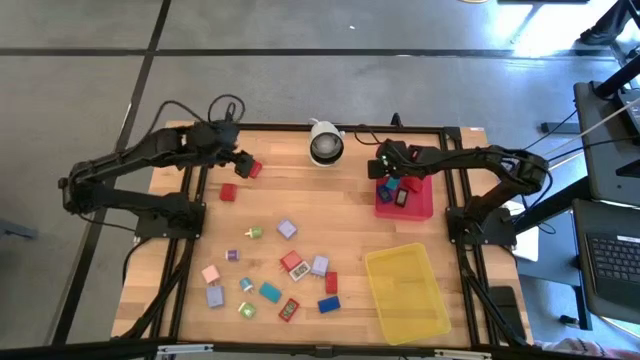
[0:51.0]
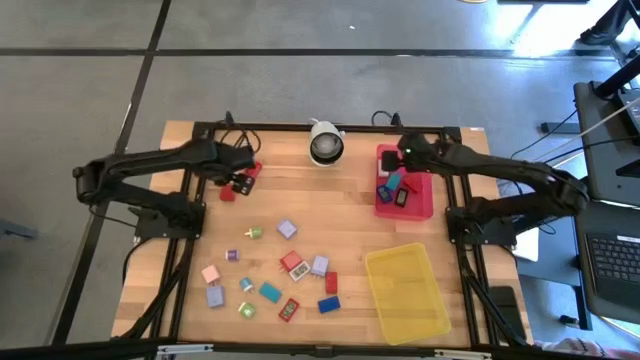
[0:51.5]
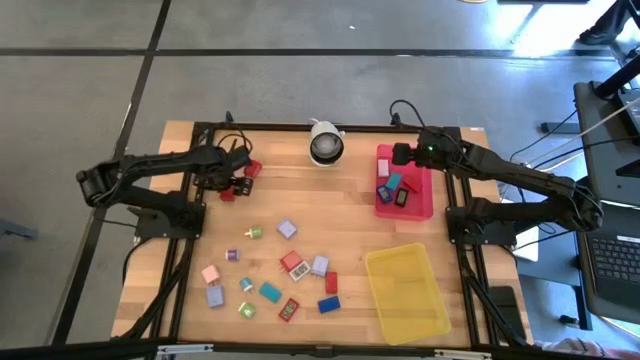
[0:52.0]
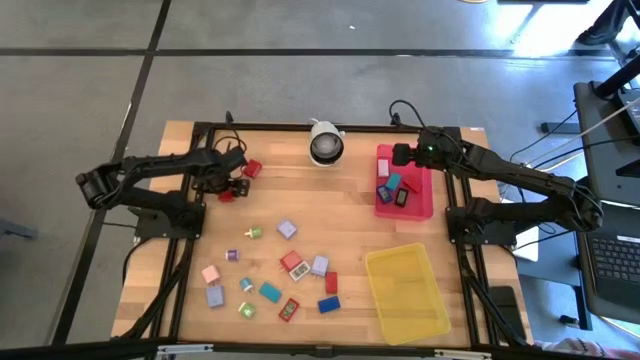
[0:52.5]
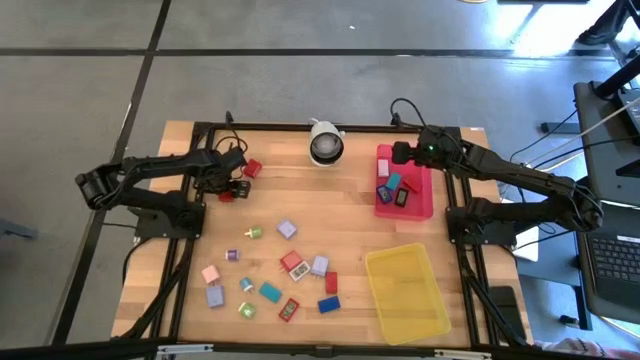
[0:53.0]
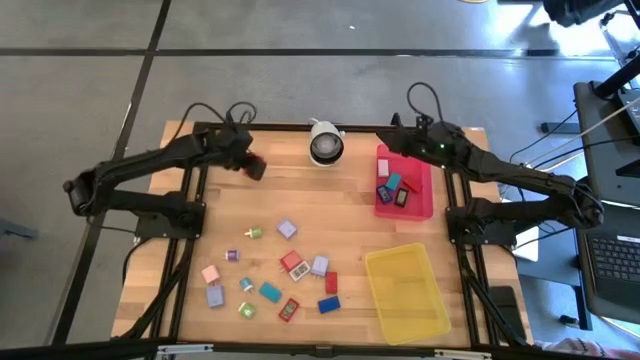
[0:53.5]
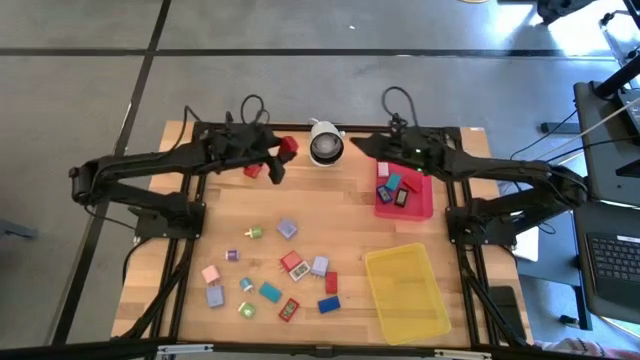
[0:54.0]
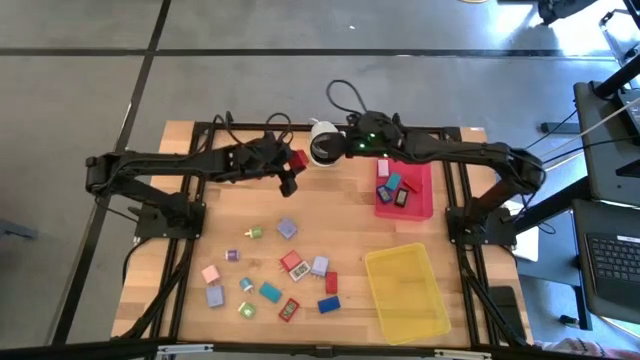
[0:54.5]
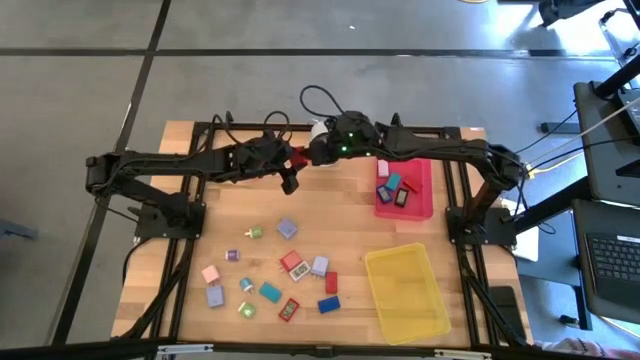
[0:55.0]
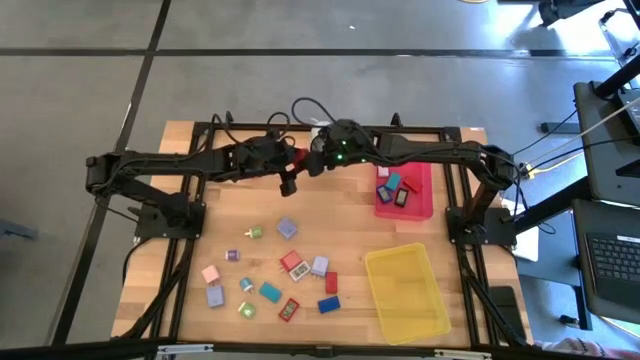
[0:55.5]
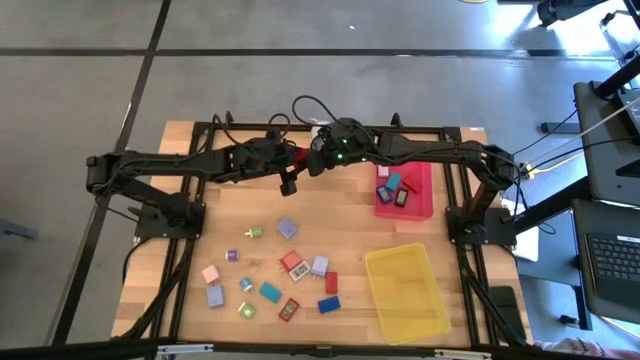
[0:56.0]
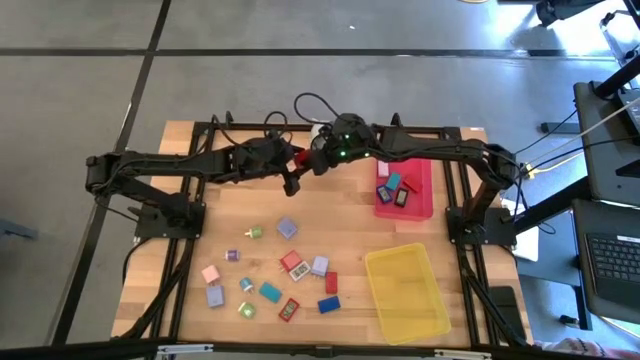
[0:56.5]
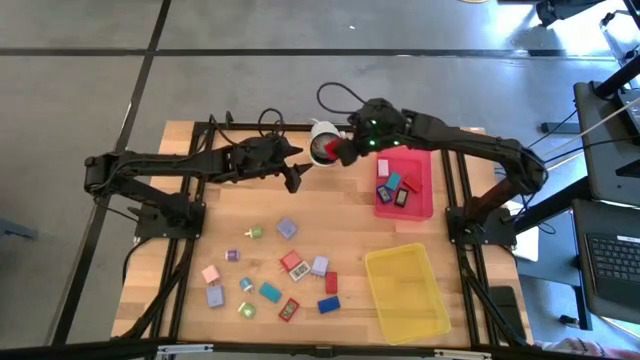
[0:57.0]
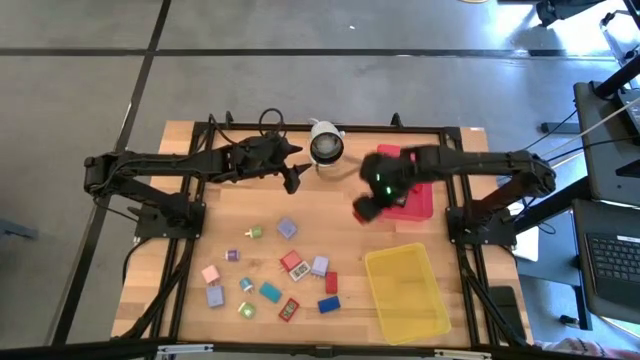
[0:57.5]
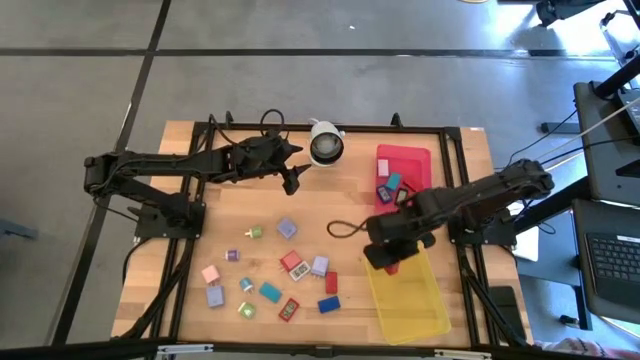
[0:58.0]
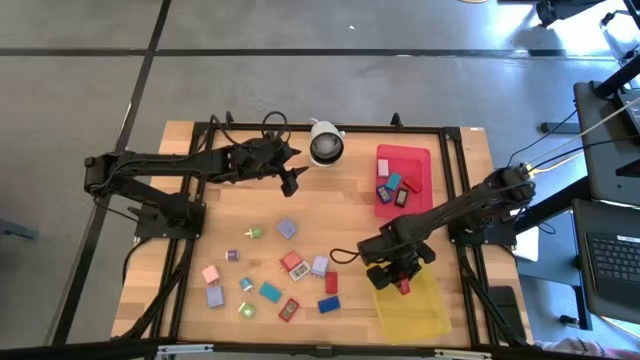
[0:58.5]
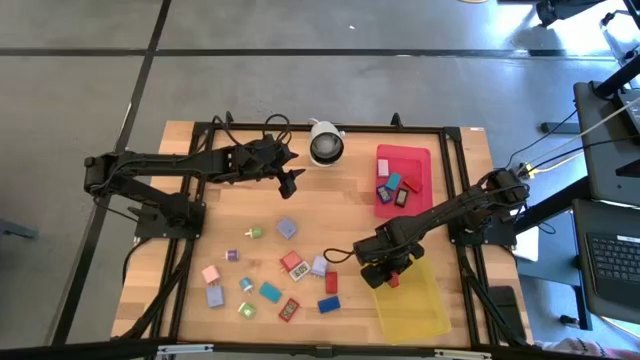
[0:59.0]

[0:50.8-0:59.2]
Task: Pick & Place Office items
Put the middle left red charger adapter into the yellow bin

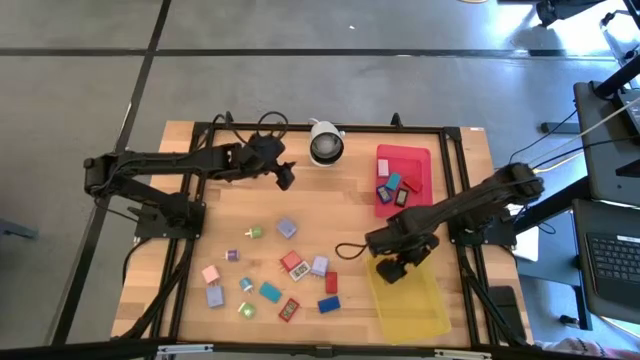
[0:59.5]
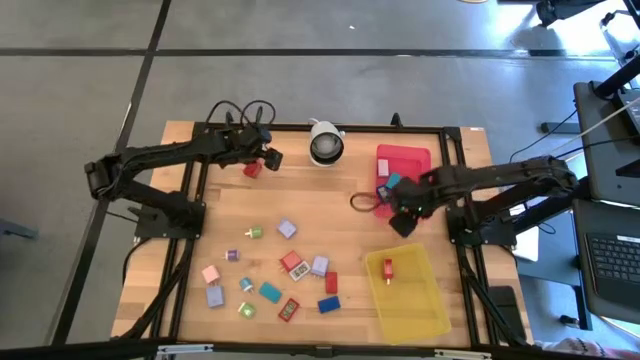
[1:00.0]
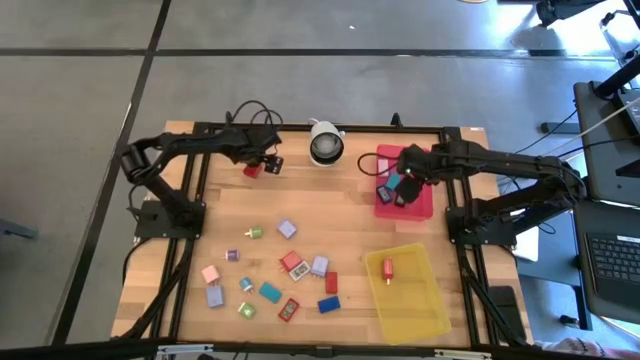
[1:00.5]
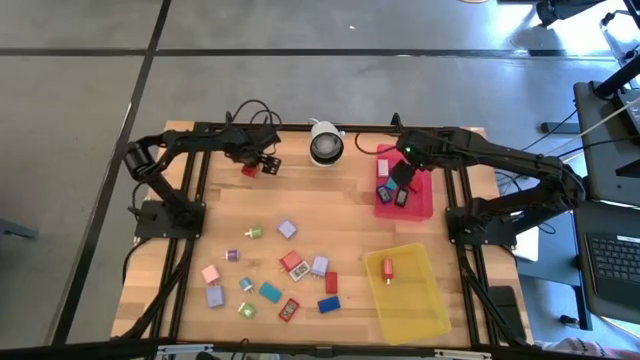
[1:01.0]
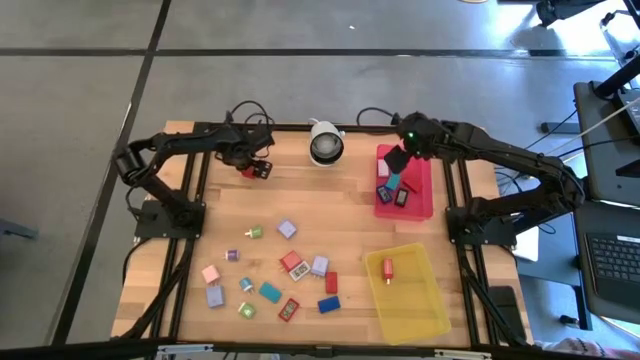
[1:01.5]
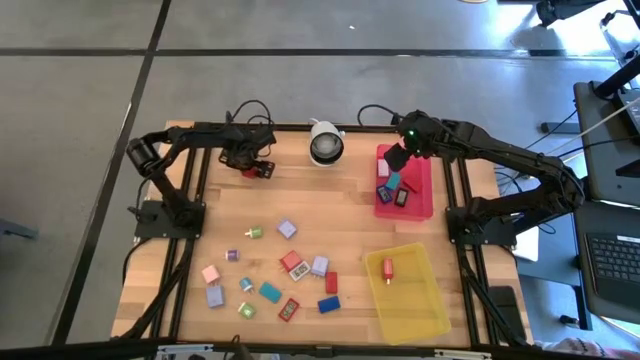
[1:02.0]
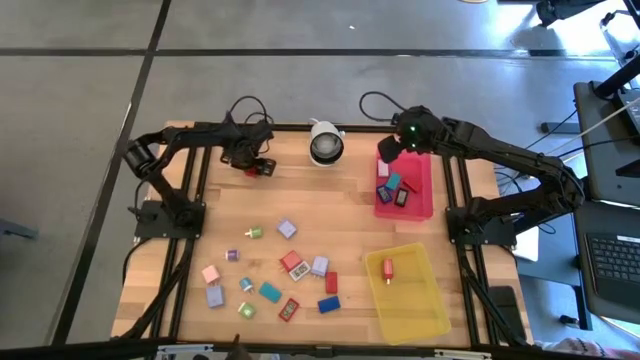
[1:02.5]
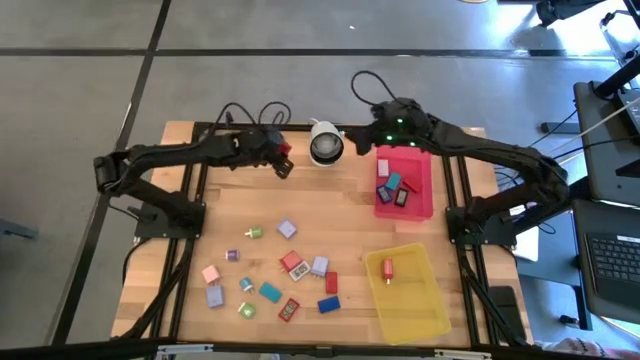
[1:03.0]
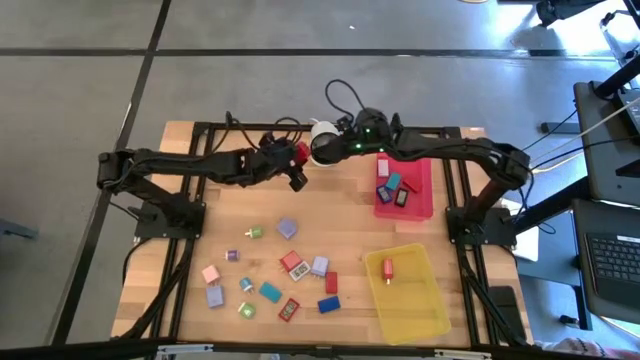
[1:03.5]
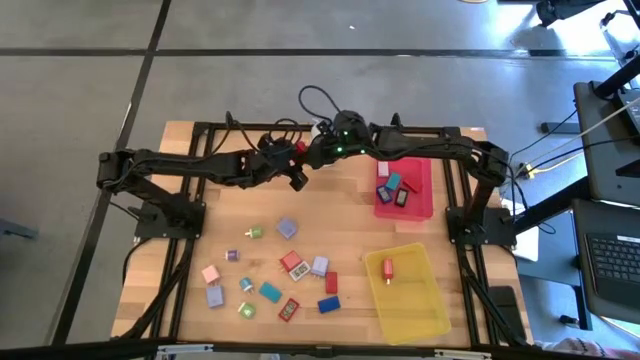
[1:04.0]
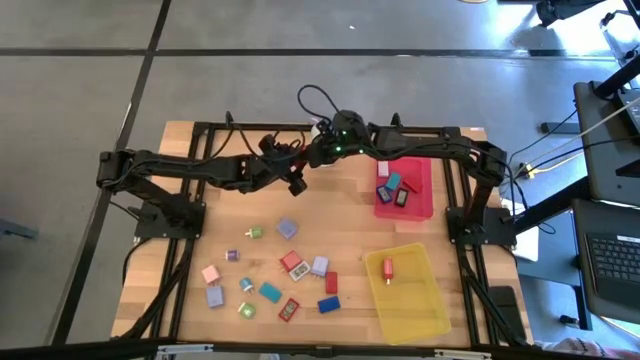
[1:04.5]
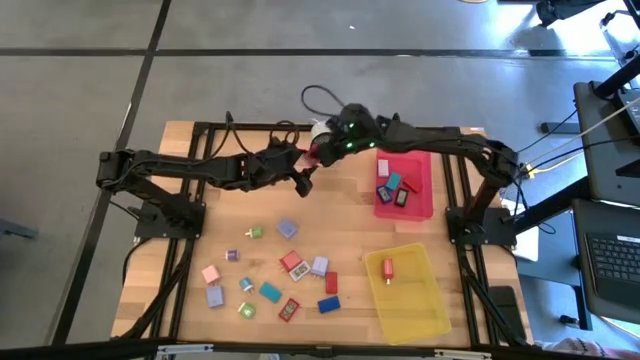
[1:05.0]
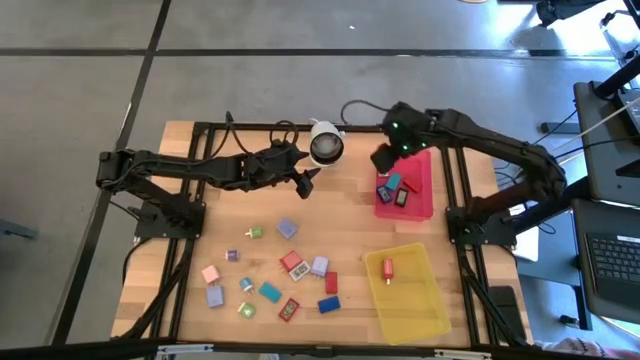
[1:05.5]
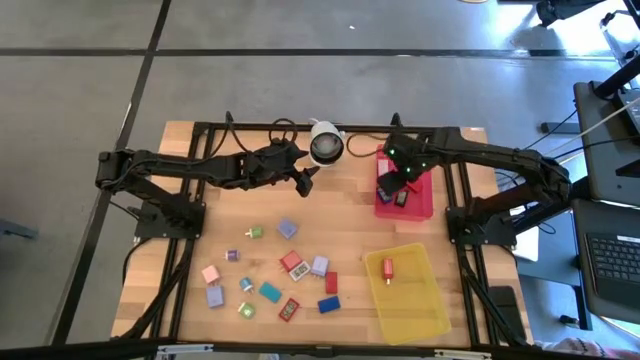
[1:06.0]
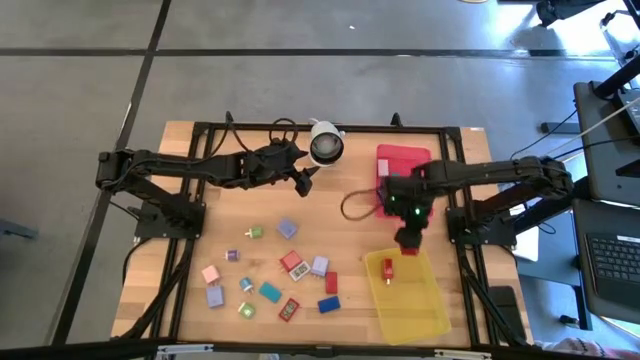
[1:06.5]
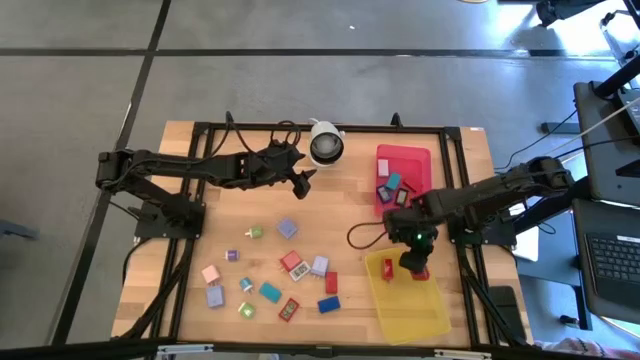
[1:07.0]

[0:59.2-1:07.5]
Put the top red charger adapter into the yellow bin

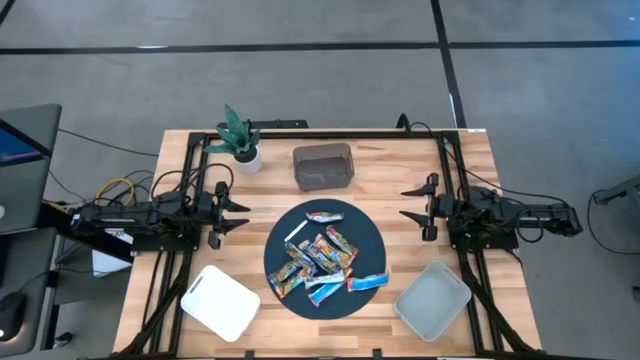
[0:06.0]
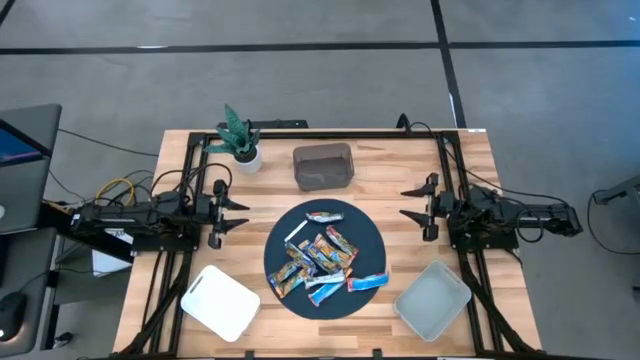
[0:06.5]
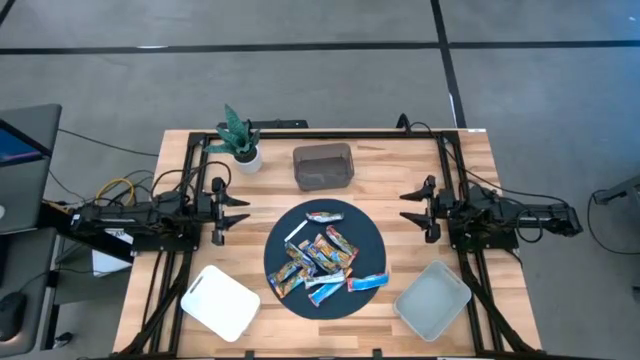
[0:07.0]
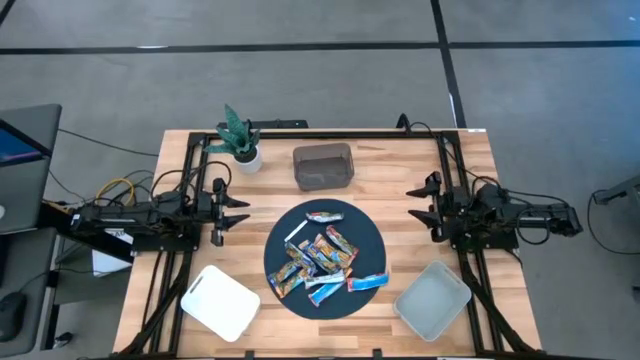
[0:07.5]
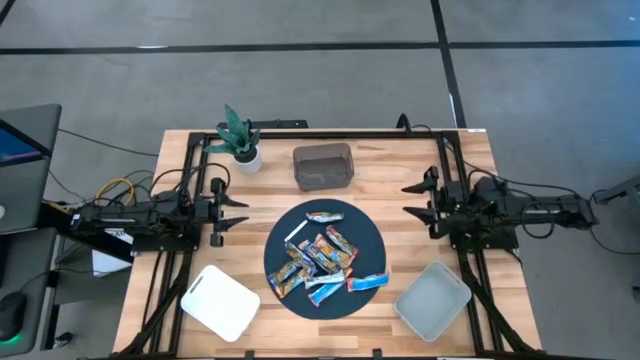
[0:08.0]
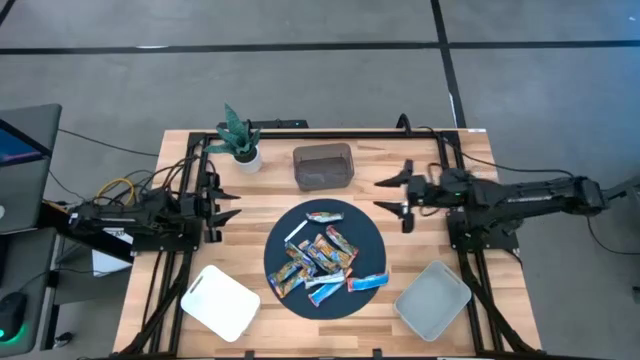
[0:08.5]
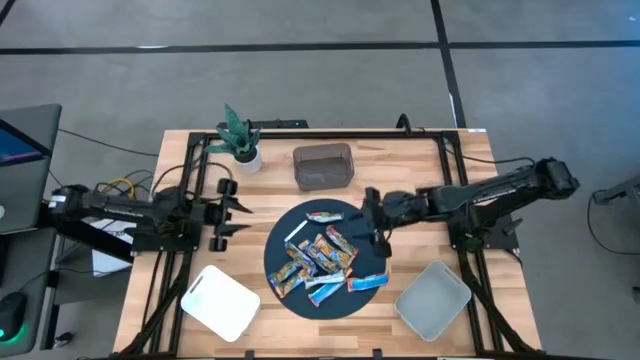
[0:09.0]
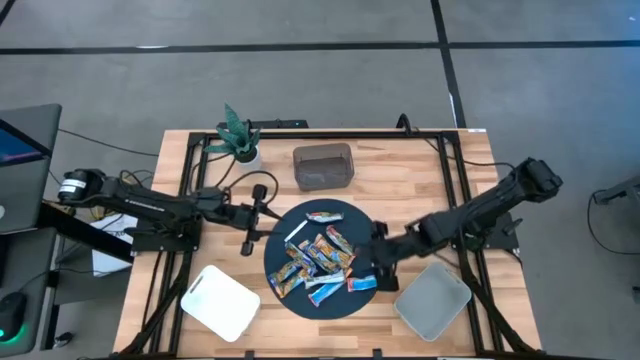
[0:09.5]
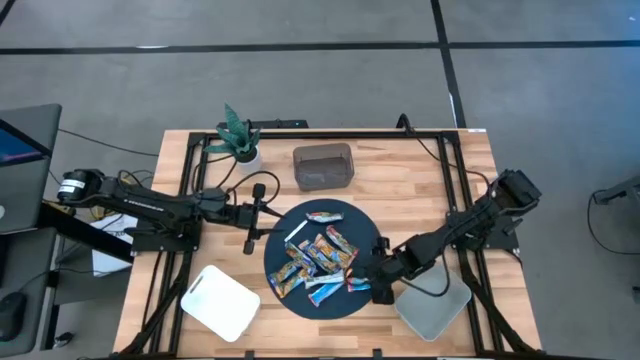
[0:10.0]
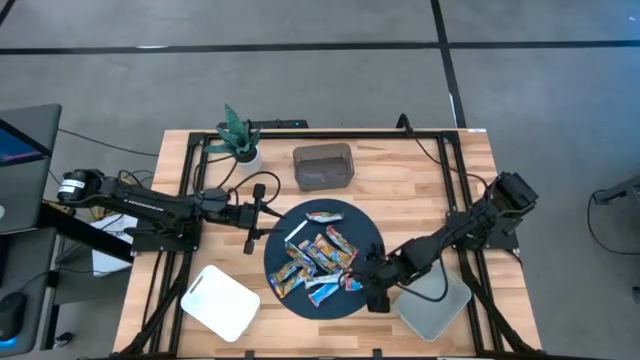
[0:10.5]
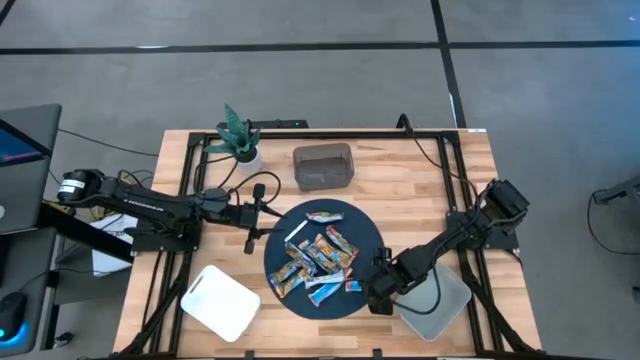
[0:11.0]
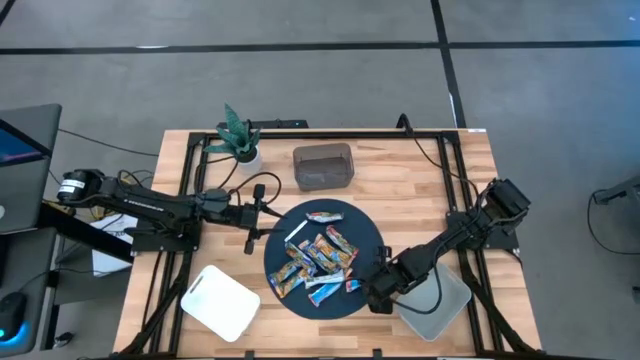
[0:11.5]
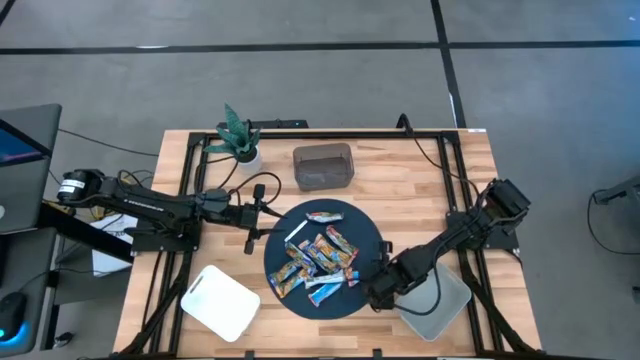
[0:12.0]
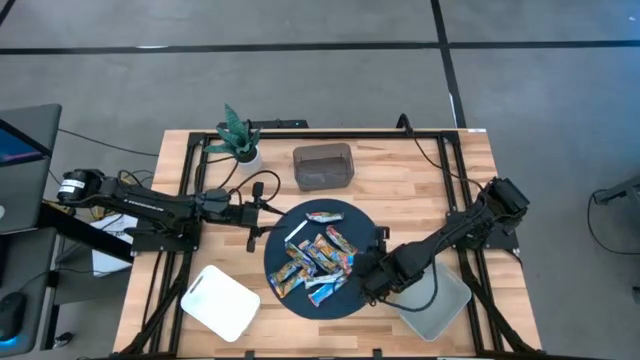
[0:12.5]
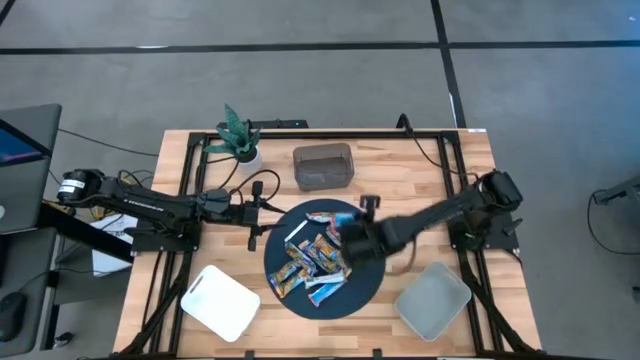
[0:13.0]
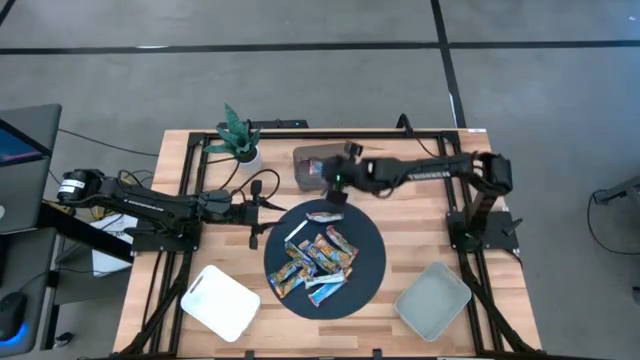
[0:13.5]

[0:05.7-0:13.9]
Task: Pick and place Granola Bars by type
Put the red granola bar into the black bin
